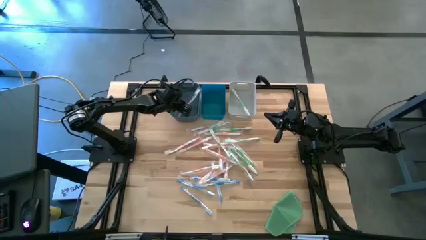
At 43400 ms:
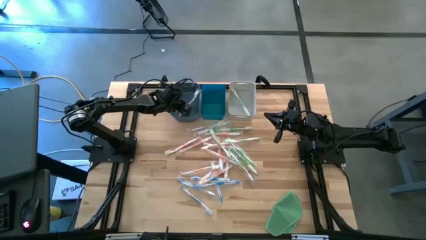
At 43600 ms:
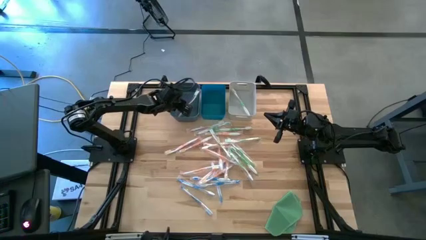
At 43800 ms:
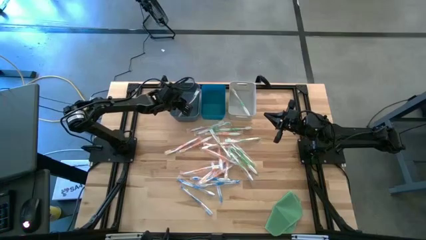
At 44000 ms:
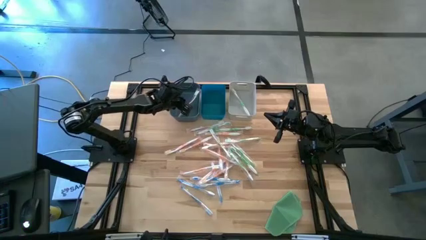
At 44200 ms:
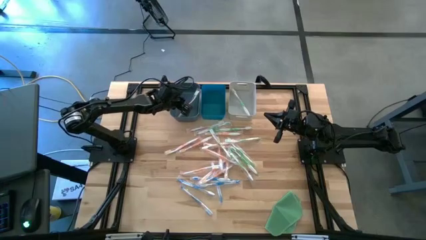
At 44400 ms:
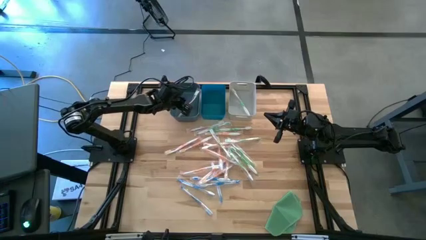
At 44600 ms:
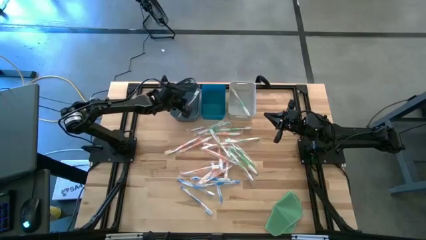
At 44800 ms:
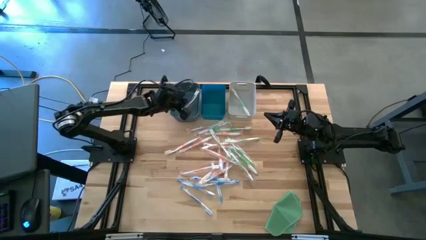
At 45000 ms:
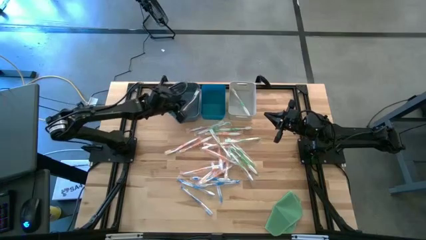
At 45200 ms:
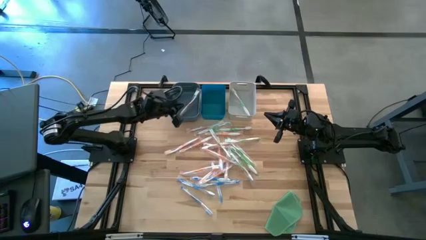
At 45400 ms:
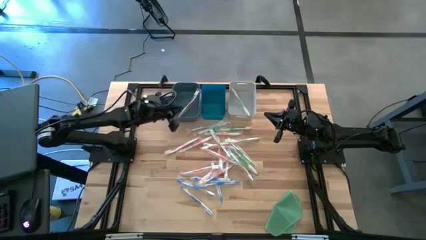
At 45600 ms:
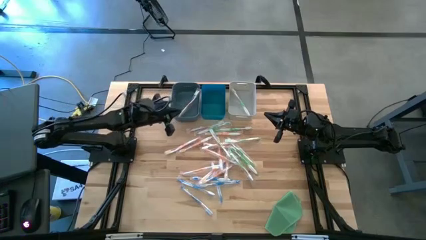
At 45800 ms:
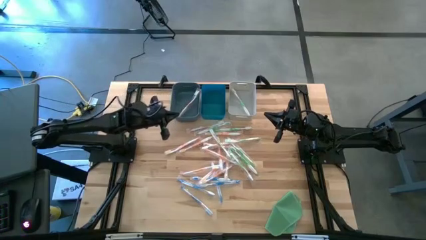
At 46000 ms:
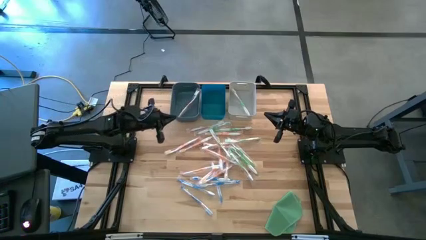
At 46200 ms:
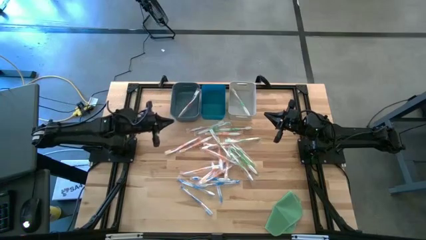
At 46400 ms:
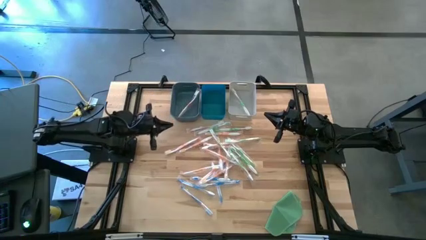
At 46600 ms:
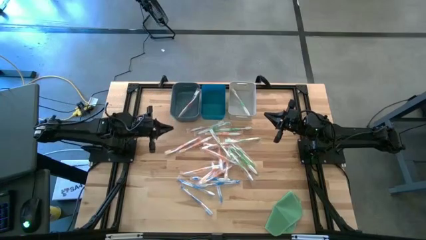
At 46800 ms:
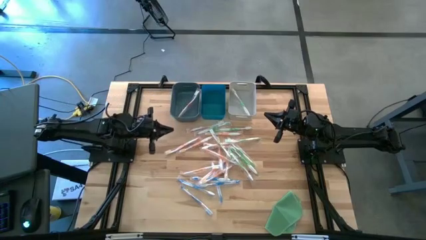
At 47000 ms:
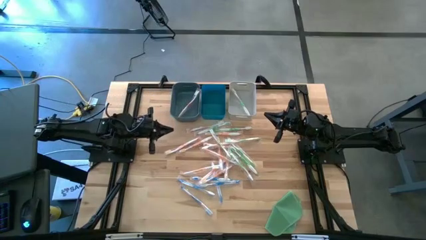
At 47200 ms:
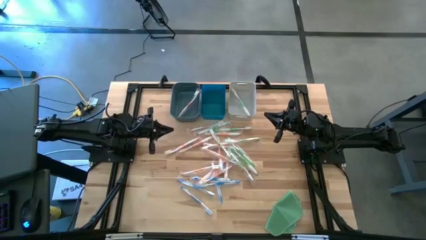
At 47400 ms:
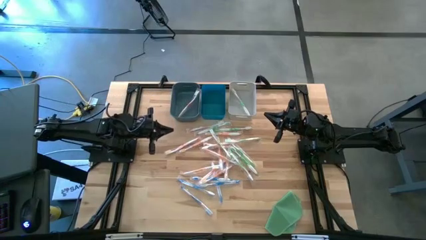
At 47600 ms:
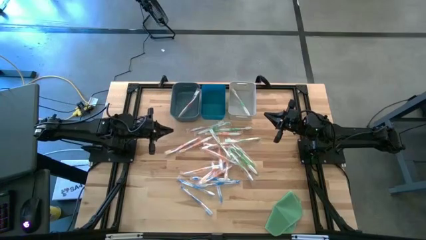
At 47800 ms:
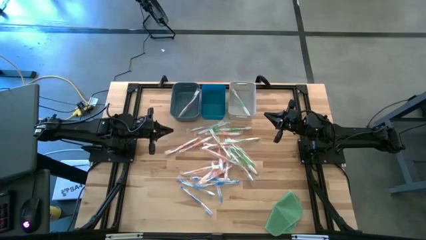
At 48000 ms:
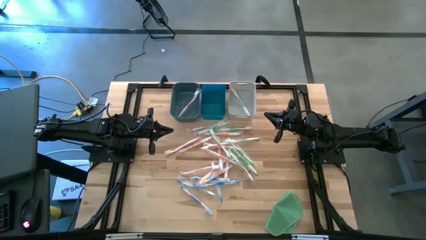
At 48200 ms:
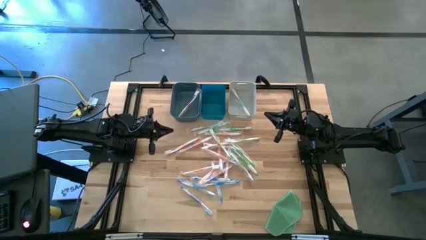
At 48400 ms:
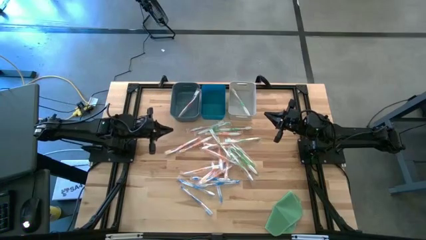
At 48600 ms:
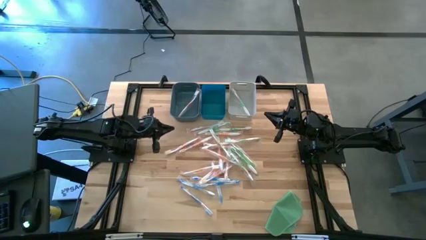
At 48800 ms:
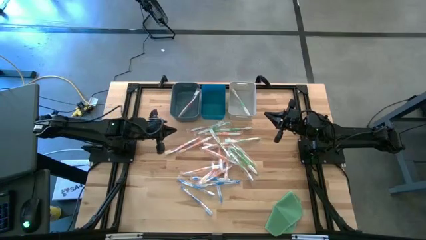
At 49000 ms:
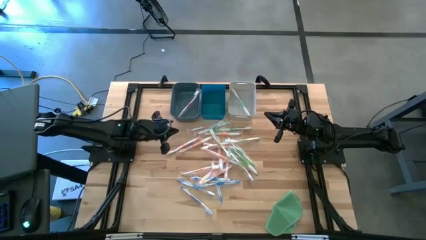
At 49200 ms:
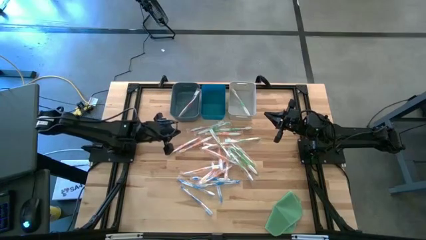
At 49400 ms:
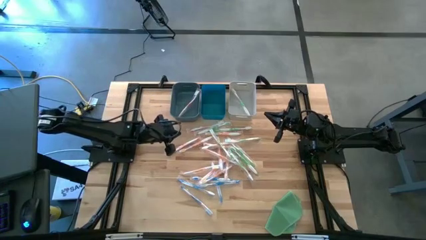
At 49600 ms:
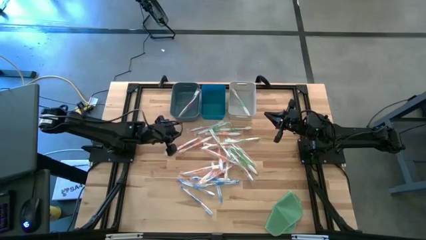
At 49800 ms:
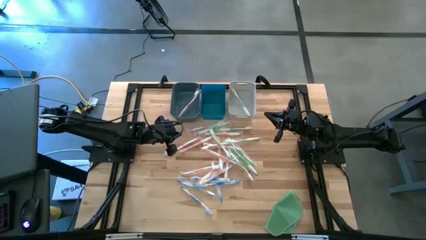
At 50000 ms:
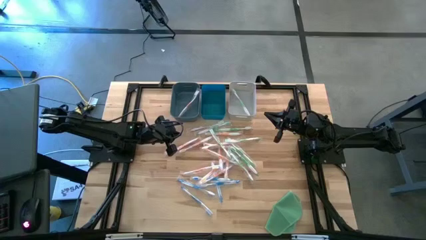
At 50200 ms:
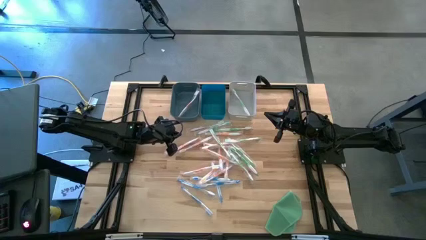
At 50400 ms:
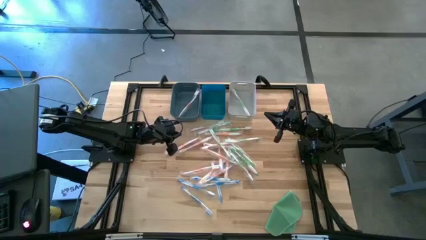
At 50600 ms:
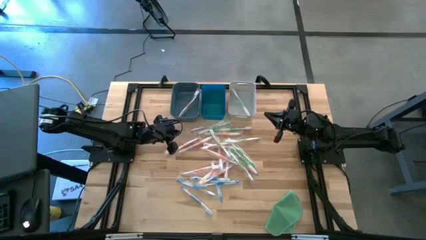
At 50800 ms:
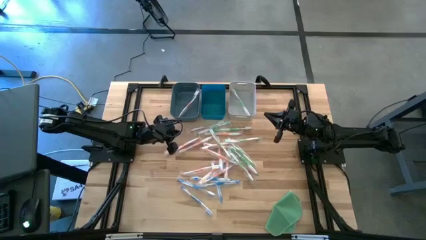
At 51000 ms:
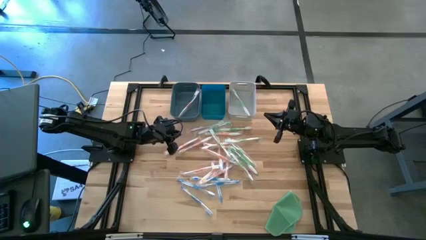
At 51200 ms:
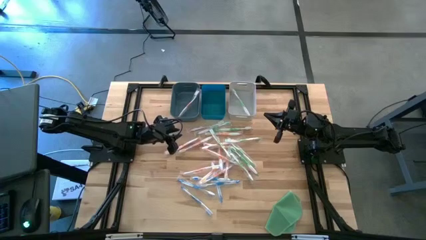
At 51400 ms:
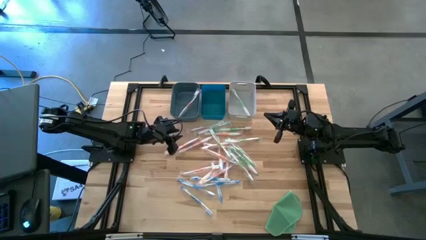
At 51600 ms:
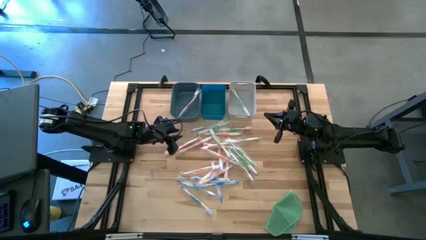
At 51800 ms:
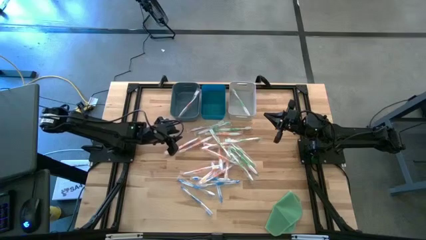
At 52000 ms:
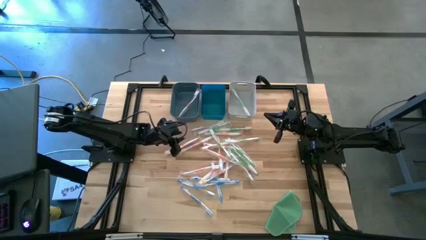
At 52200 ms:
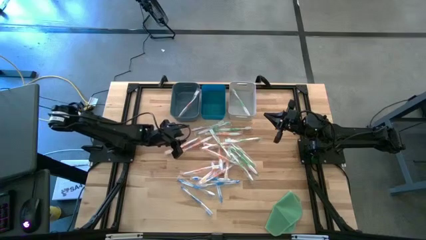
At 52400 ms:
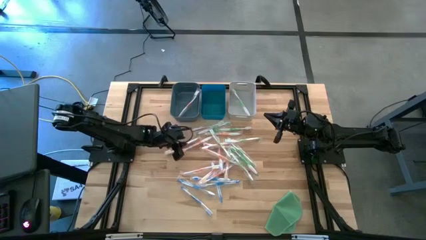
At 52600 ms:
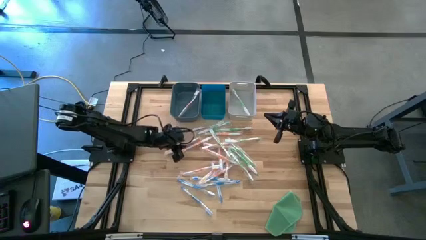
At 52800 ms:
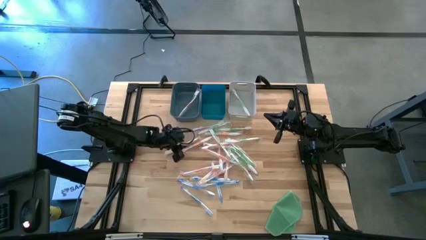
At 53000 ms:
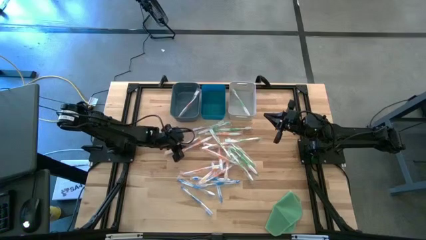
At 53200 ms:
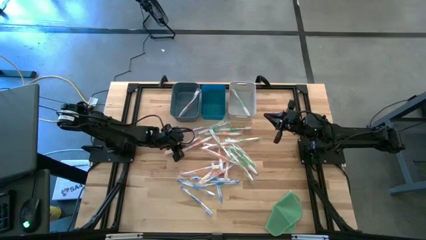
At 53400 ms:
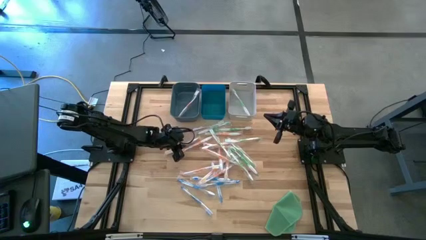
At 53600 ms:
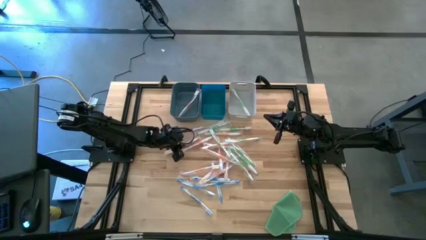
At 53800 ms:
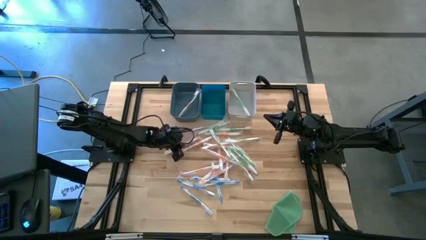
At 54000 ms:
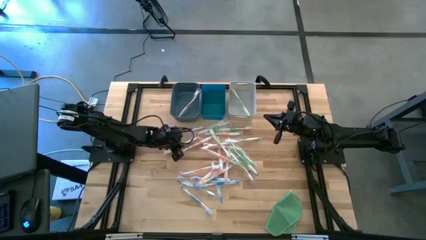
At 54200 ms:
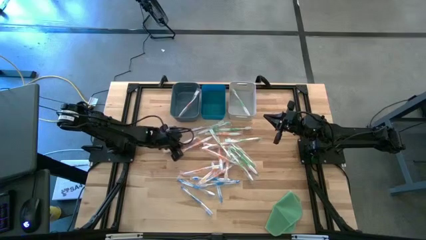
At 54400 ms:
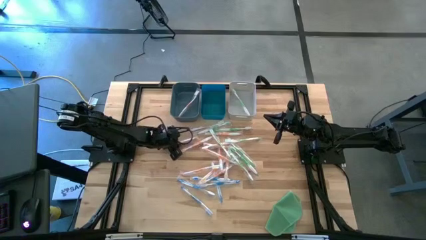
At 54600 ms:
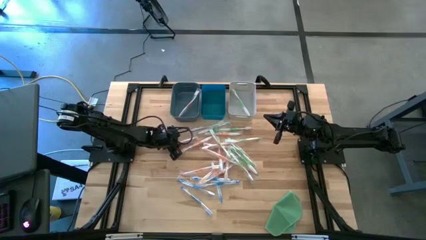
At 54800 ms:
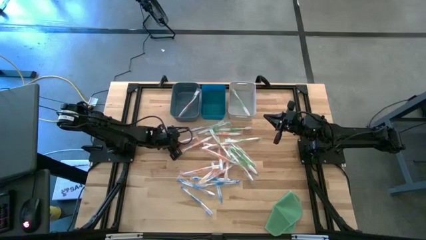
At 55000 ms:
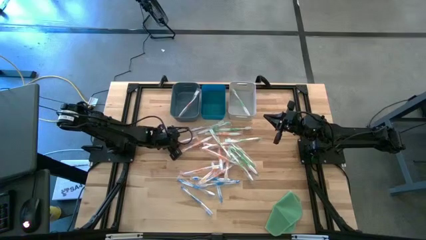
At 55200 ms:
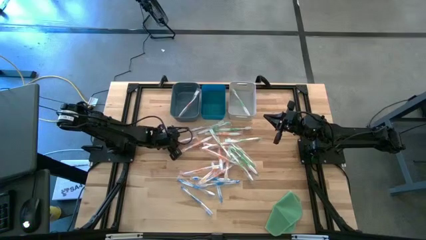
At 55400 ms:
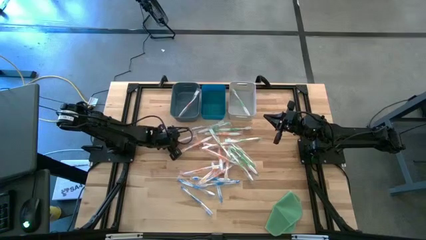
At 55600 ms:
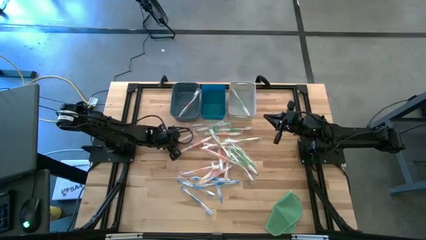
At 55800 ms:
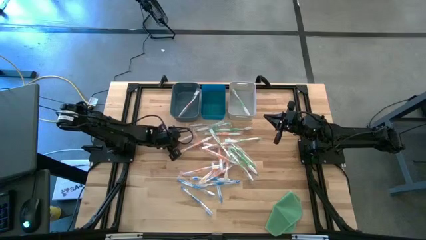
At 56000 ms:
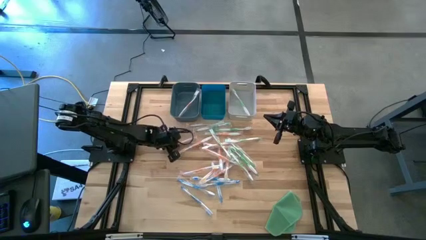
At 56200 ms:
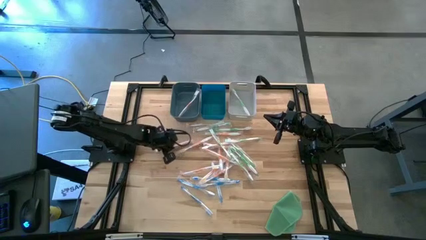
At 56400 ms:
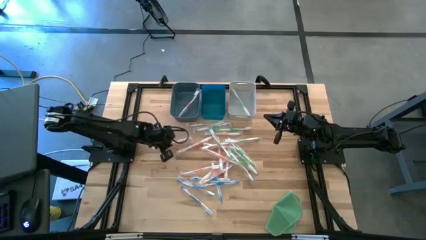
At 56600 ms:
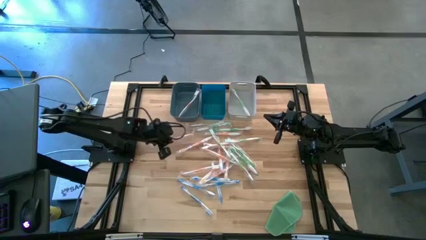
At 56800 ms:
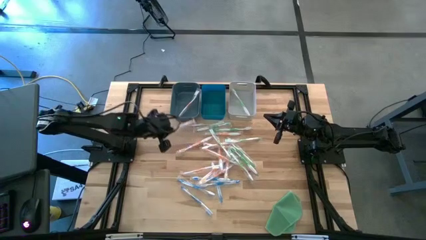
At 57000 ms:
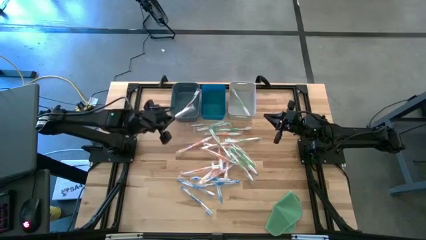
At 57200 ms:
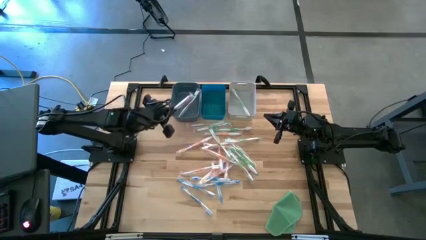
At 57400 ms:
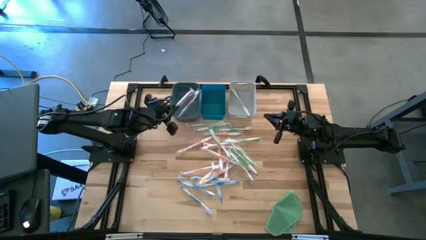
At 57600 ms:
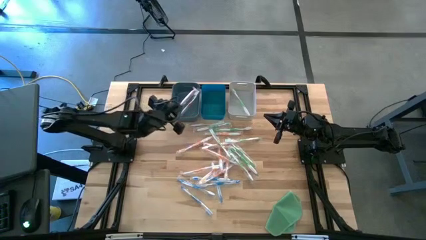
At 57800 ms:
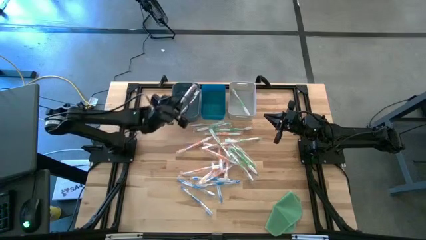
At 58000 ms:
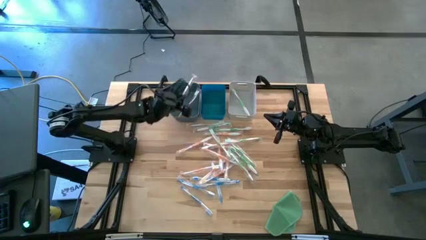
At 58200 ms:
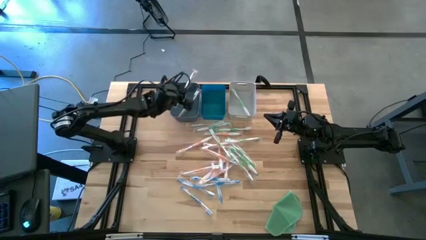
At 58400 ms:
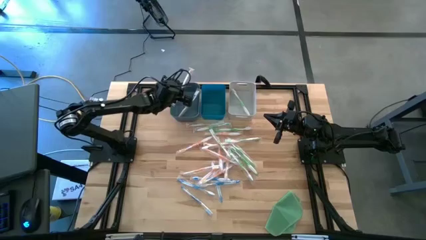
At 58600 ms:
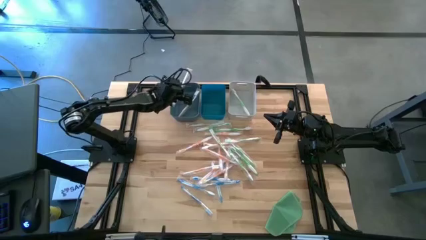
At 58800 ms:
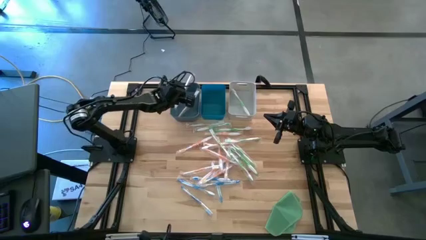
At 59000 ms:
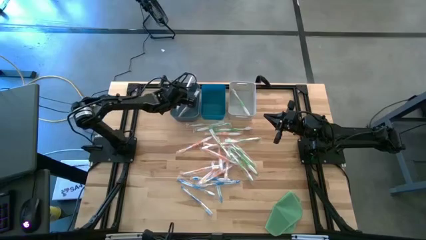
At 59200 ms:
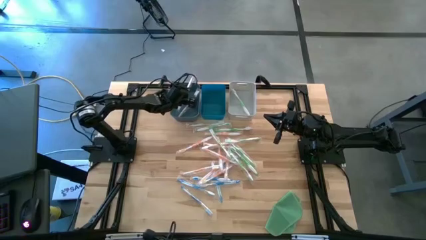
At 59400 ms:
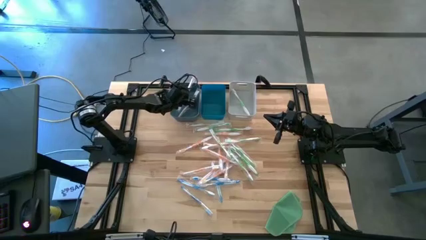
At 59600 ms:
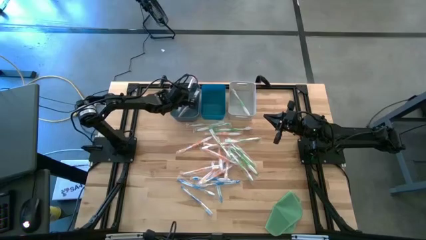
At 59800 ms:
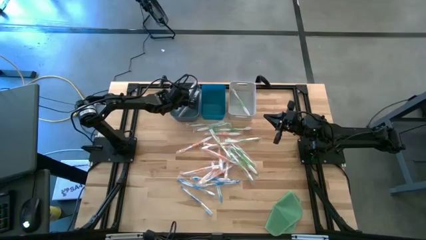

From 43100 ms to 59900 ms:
Task: Pick & Place Toothbrushes
Put the orange toothbrush into the dark blue bin
